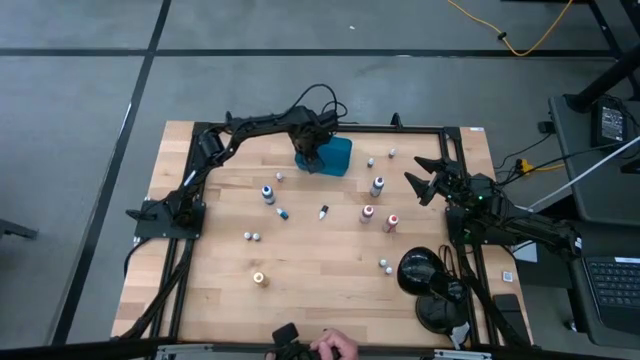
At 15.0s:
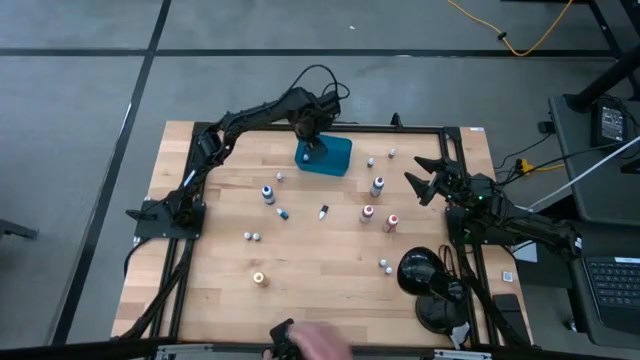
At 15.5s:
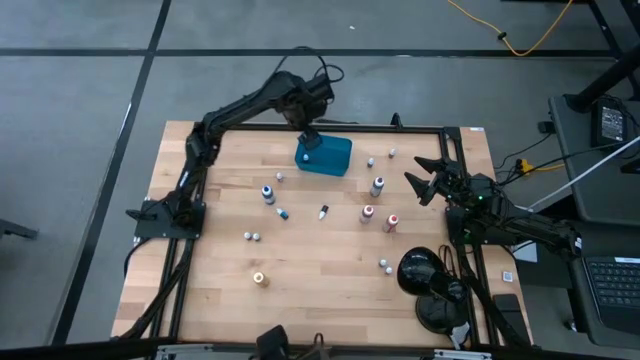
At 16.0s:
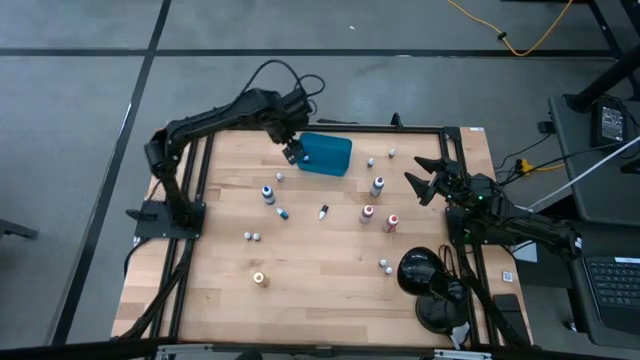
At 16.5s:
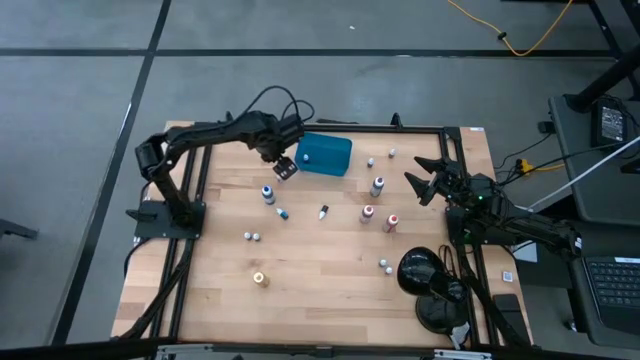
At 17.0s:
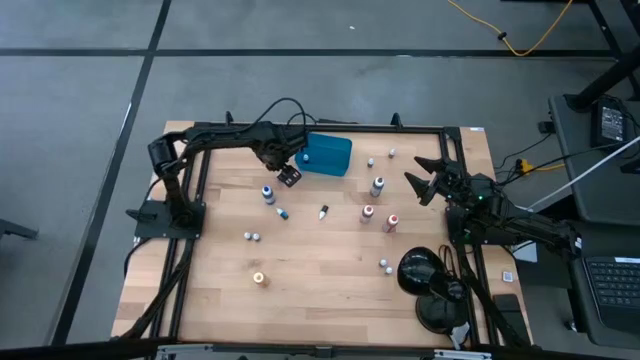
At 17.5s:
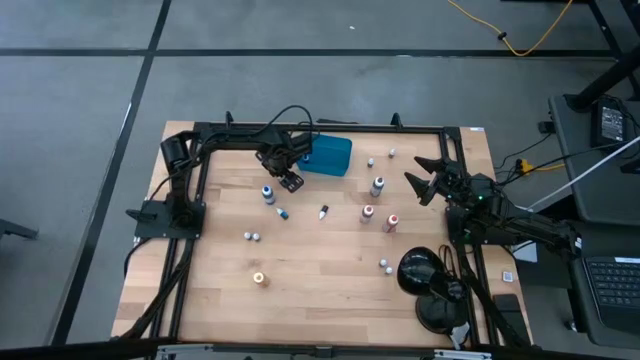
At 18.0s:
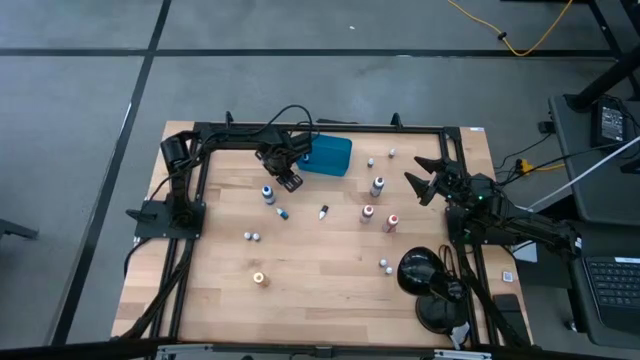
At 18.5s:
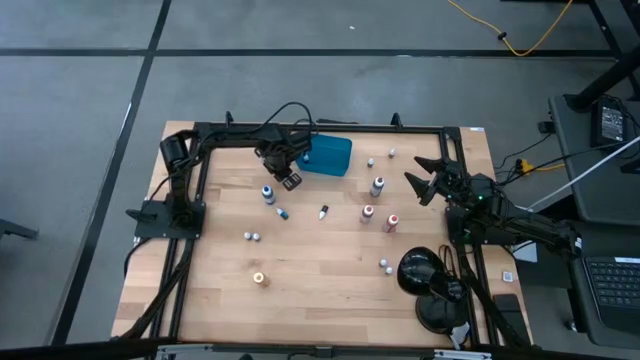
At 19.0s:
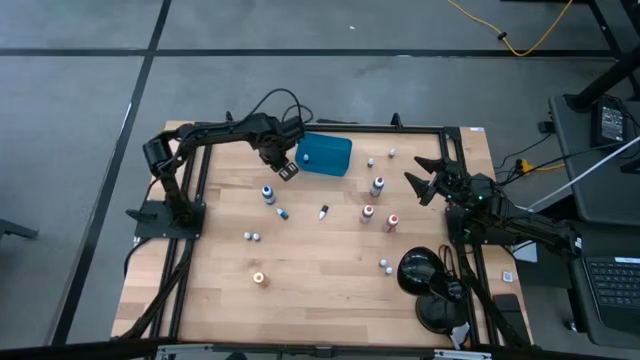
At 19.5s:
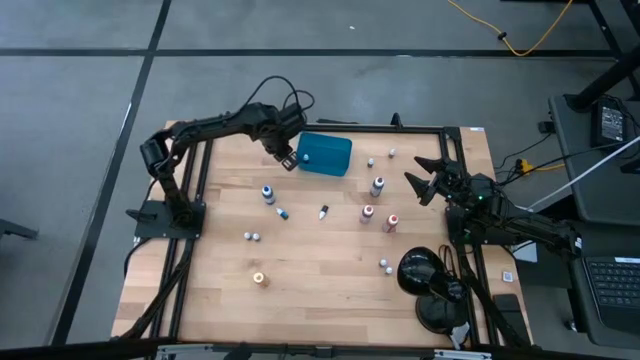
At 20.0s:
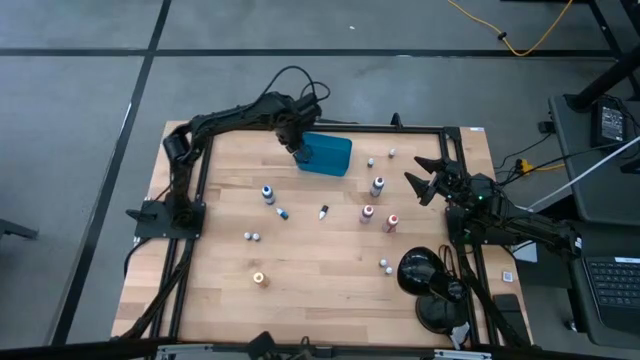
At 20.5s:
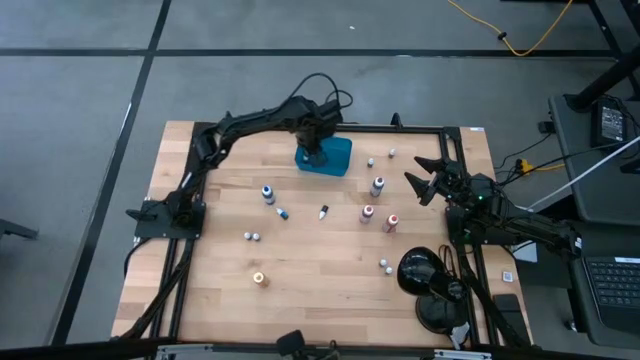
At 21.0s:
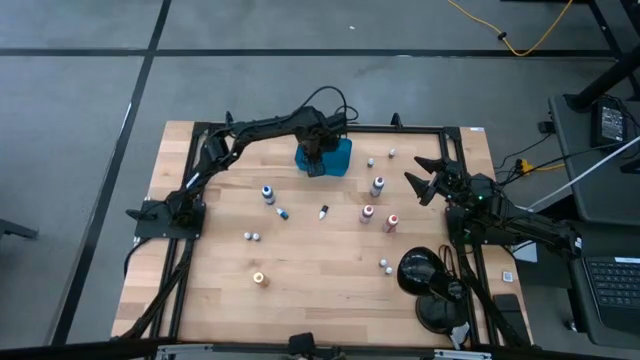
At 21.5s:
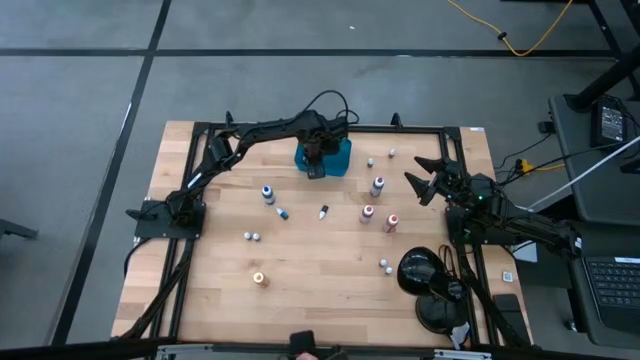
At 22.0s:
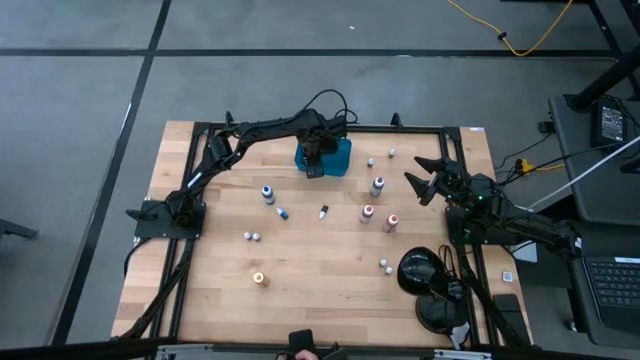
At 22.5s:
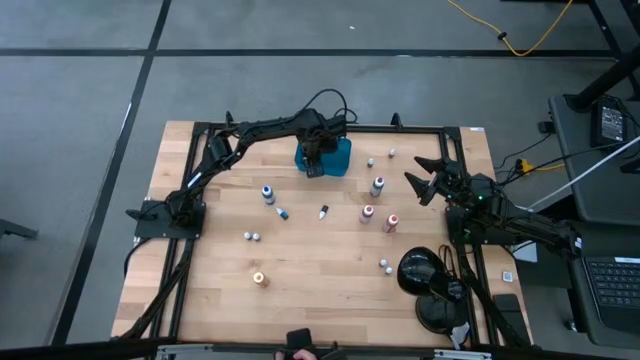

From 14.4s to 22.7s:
Task: Pick & Place food coloring
Put the small black food coloring bottle into the blue bin

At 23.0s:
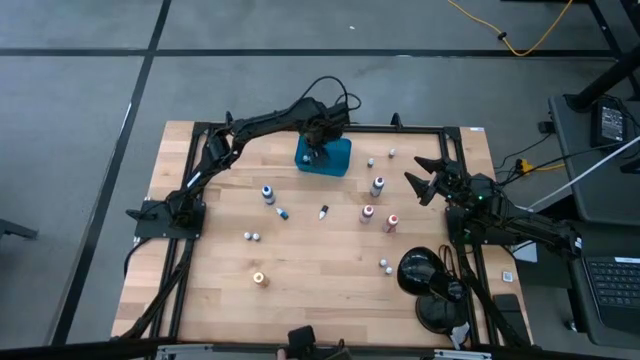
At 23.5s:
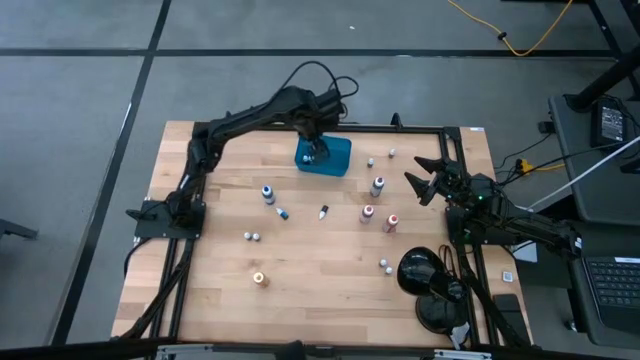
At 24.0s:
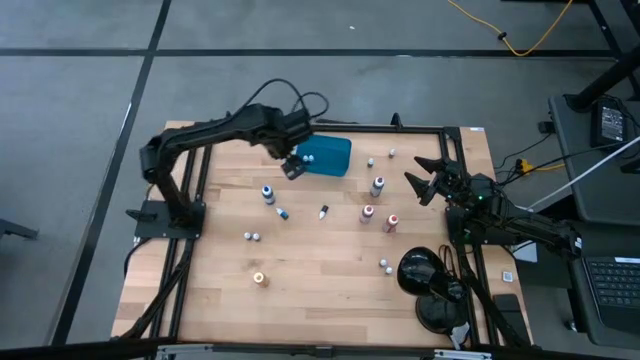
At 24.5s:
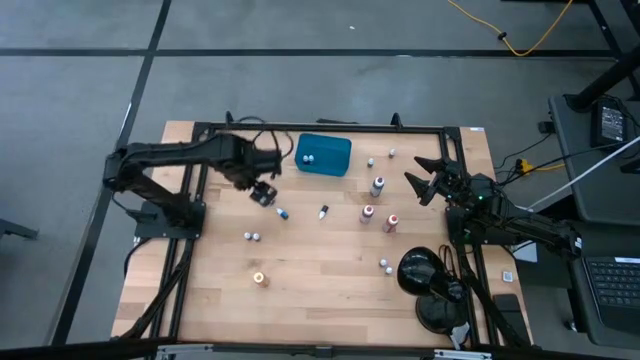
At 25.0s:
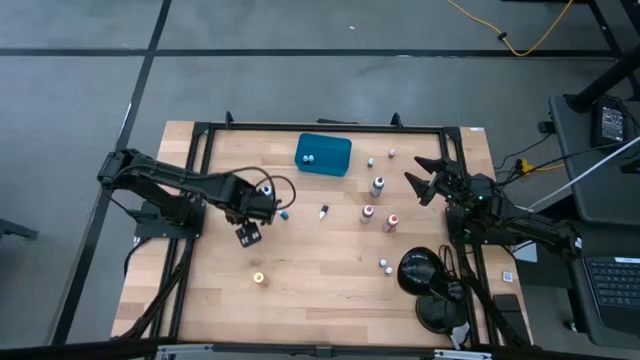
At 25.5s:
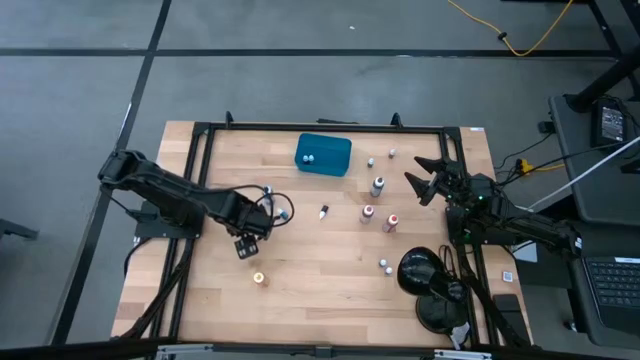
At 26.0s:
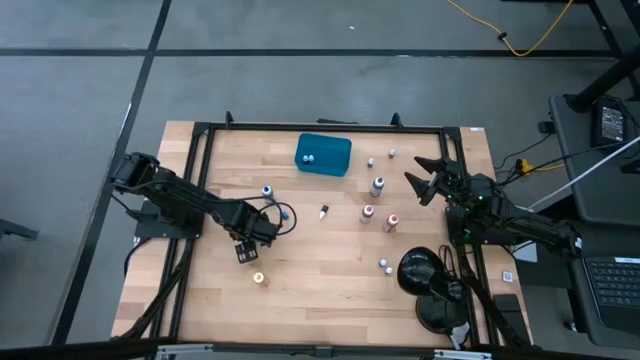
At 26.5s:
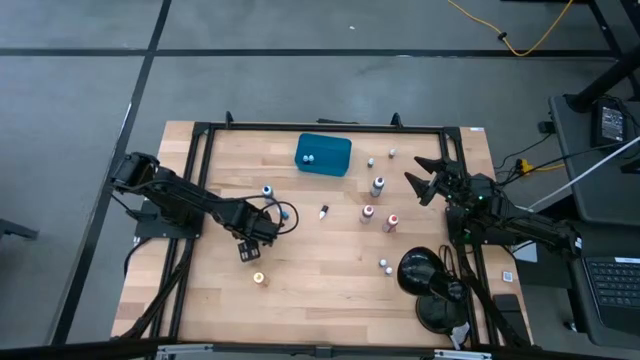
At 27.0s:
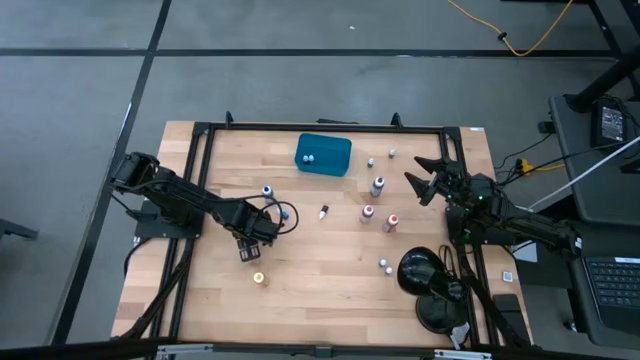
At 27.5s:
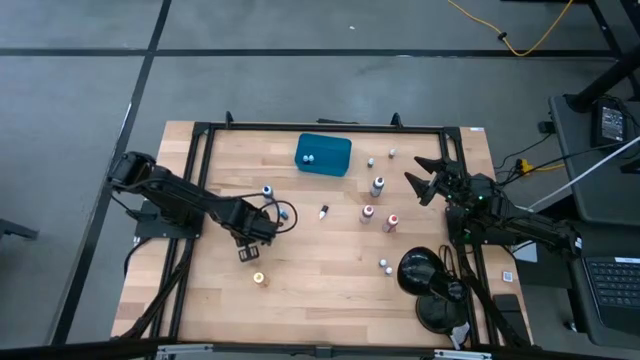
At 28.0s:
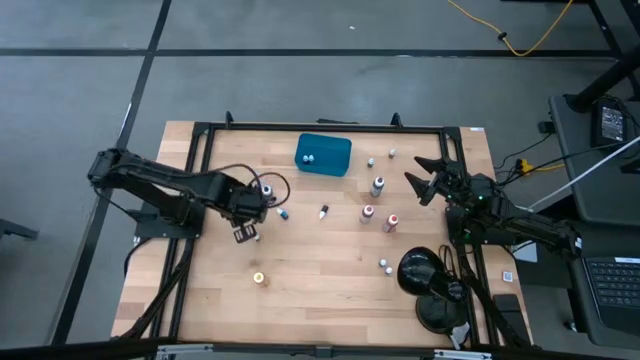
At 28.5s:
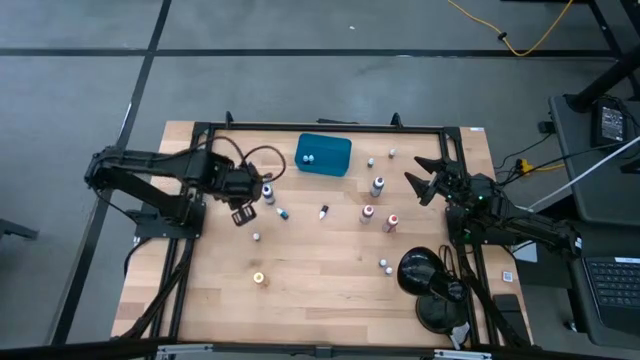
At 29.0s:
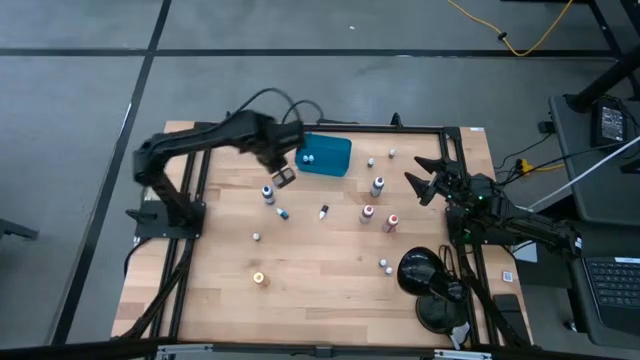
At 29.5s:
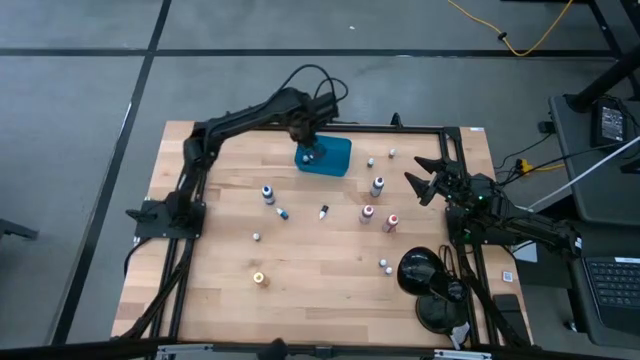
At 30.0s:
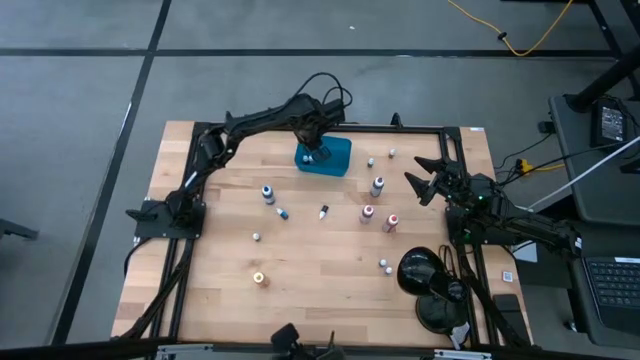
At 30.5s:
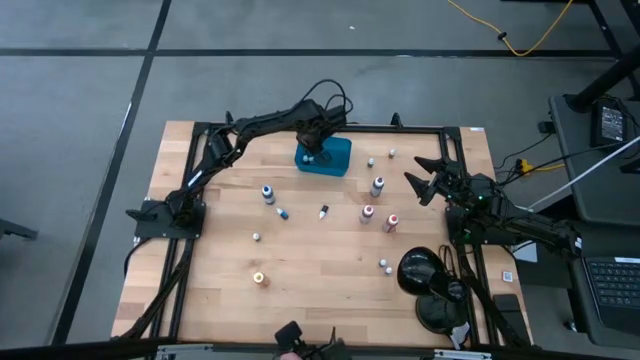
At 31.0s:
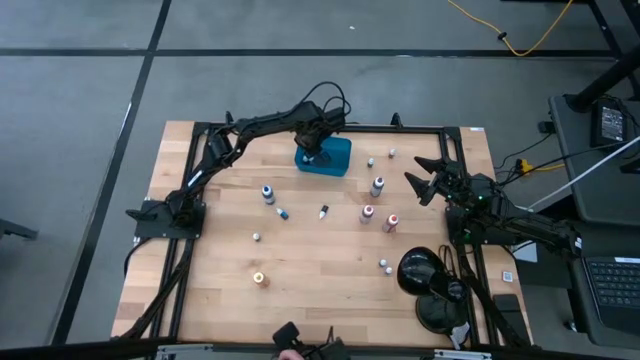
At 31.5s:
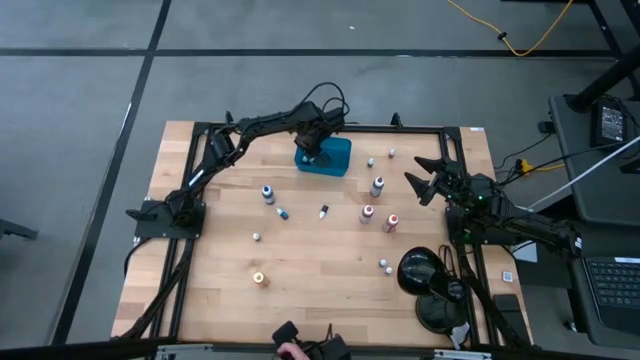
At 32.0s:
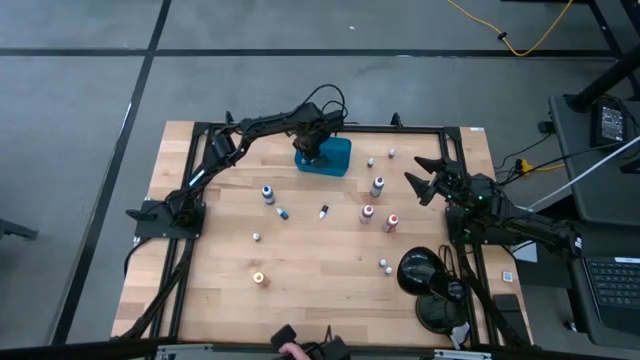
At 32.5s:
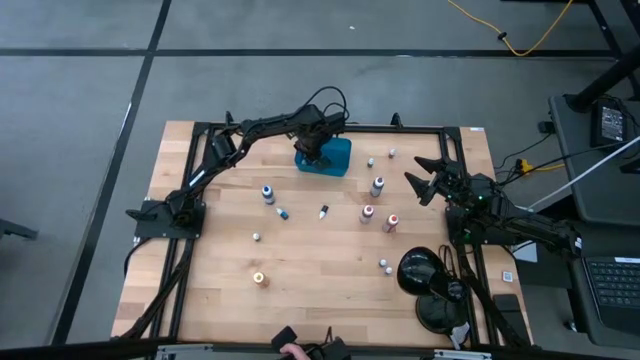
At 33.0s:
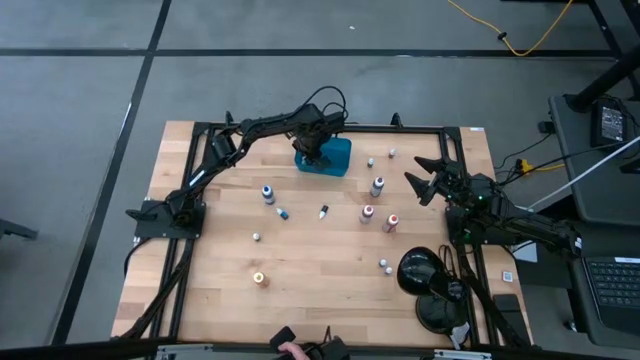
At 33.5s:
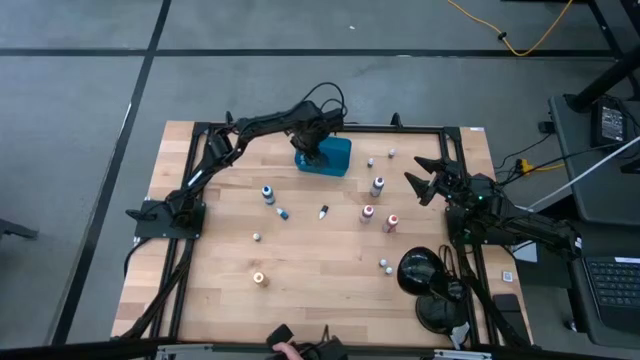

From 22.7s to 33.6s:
Put the small black food coloring bottle into the blue bin
